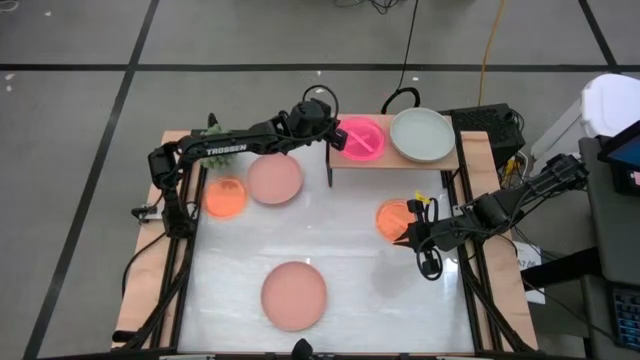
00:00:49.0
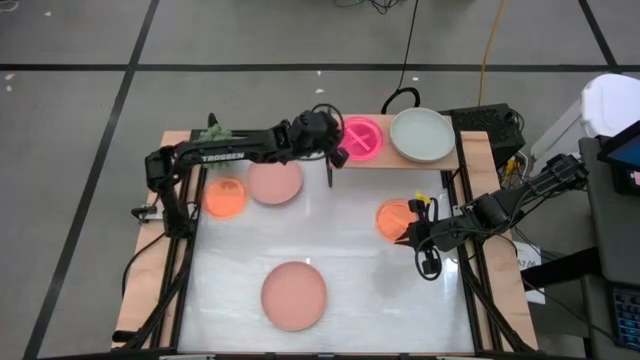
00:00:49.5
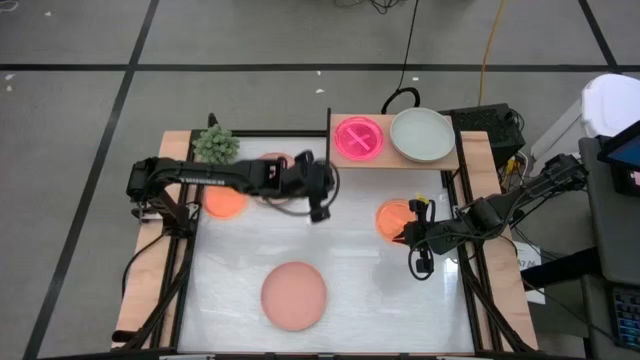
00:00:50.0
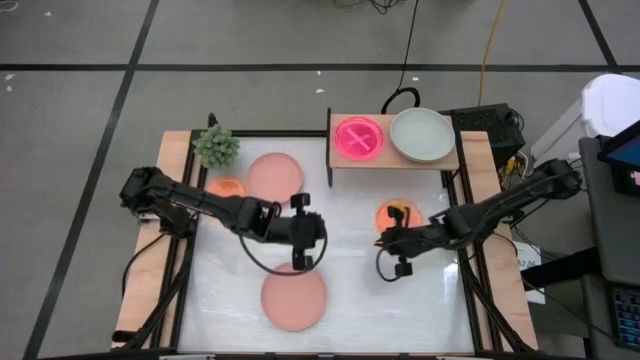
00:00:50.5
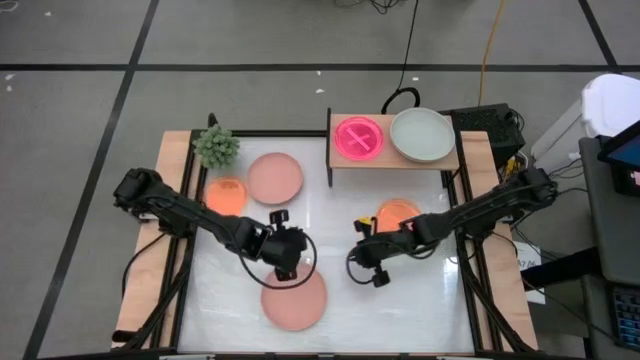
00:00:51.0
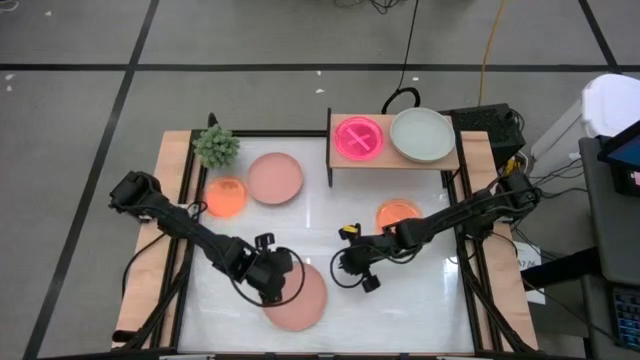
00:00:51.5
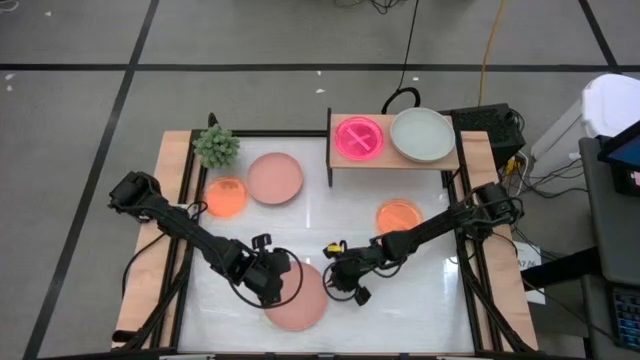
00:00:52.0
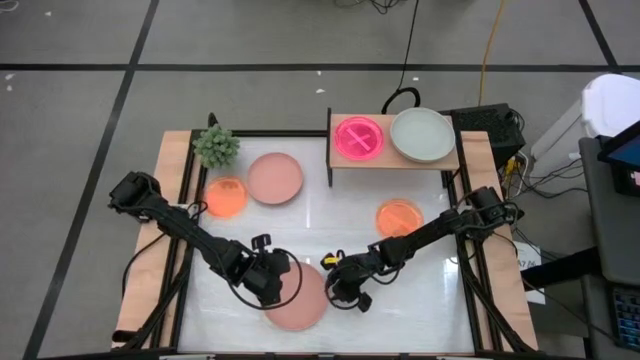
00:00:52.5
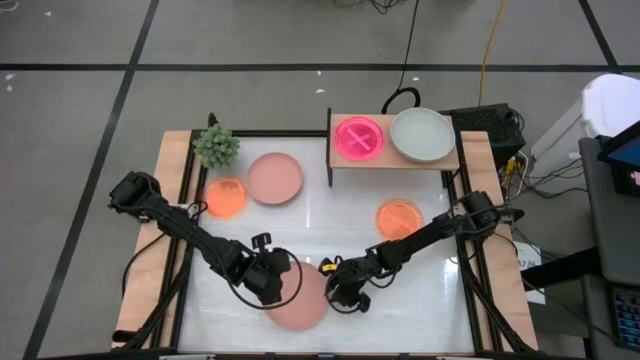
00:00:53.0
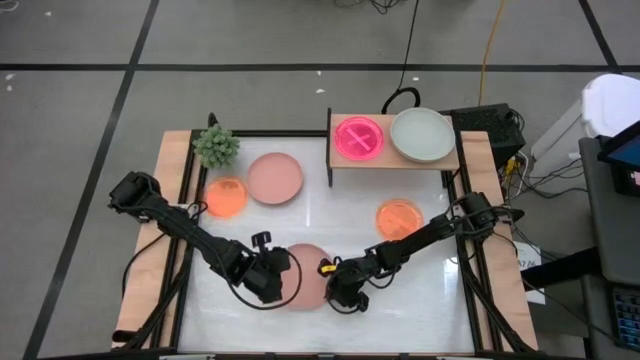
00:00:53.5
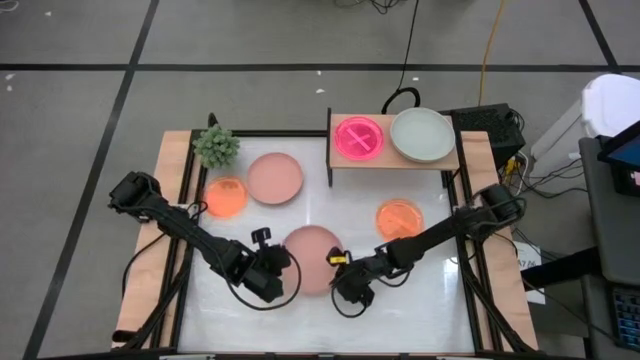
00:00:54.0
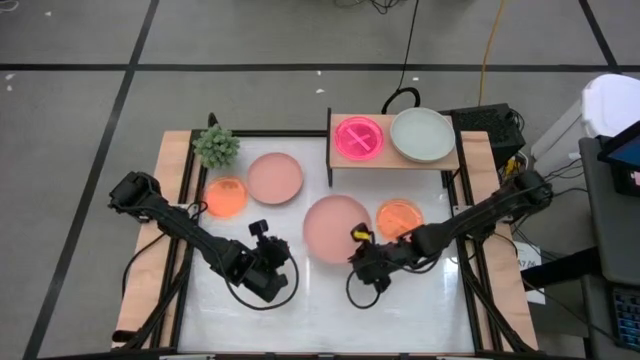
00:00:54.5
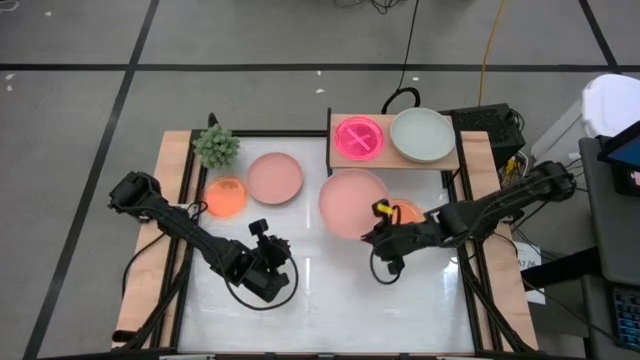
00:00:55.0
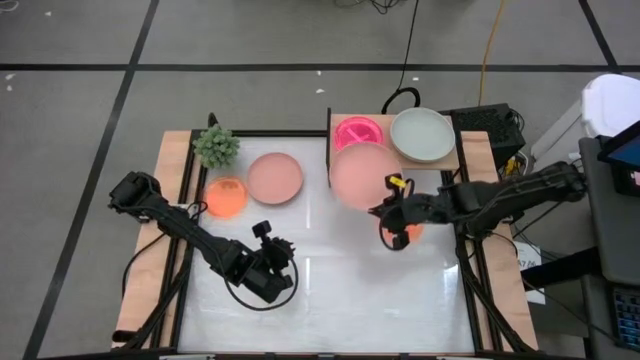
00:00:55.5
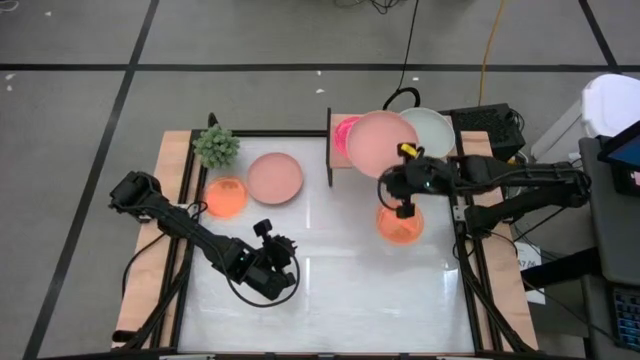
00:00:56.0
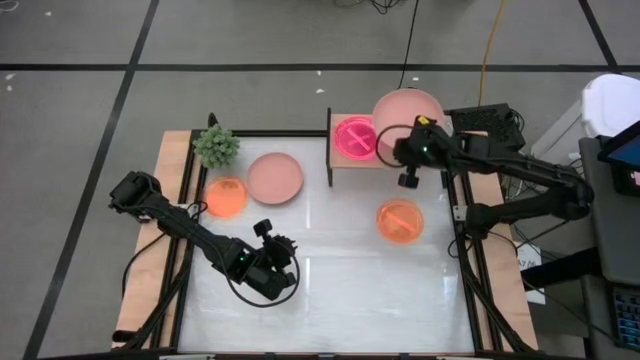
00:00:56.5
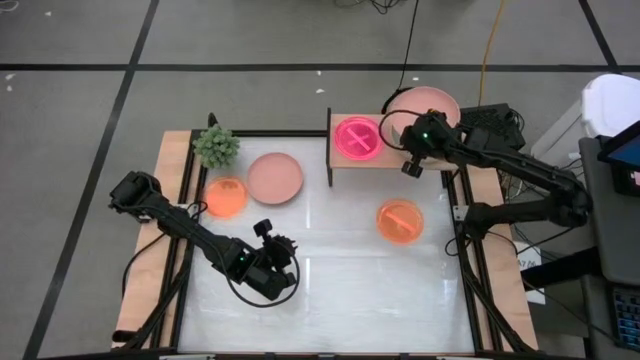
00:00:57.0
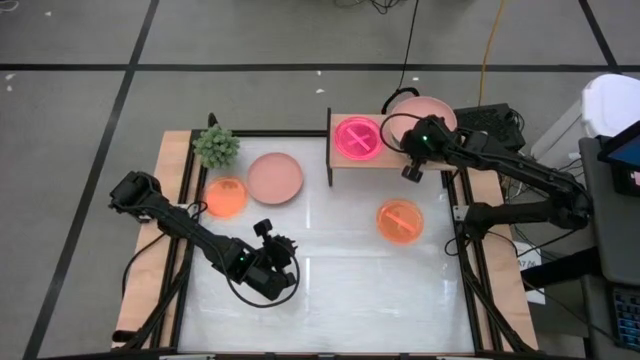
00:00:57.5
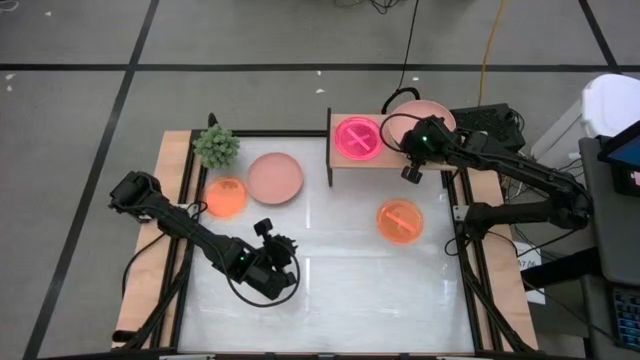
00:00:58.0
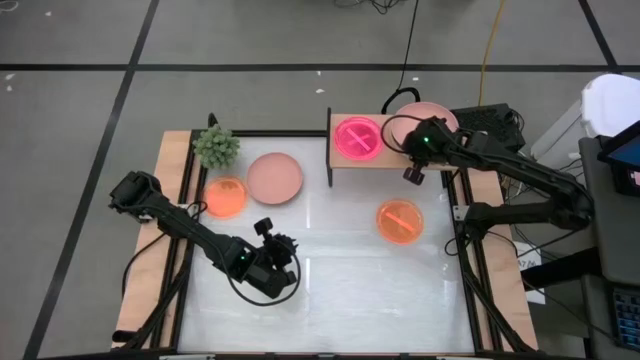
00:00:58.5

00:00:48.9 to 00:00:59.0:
Task: Place and stack plates onto a shelf
Stack the bottom pink plate on top of the gray plate on the shelf

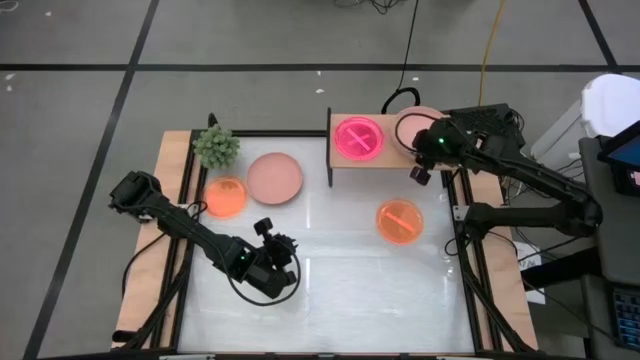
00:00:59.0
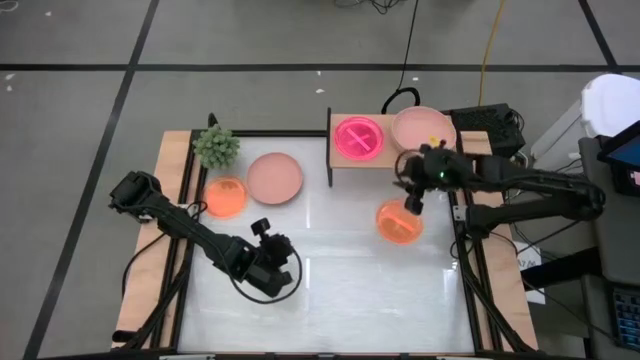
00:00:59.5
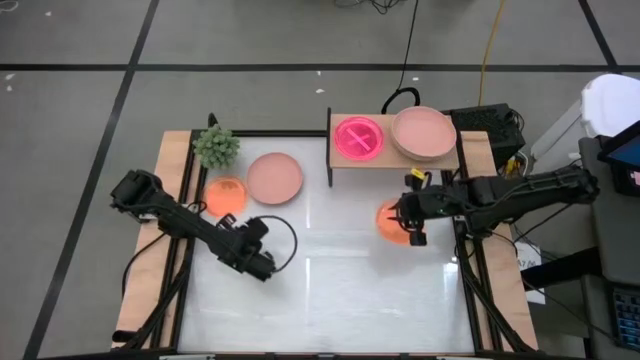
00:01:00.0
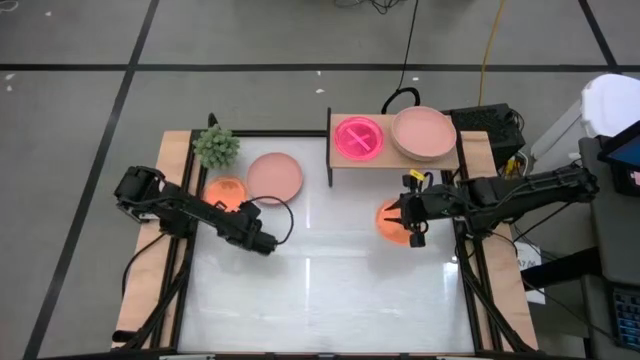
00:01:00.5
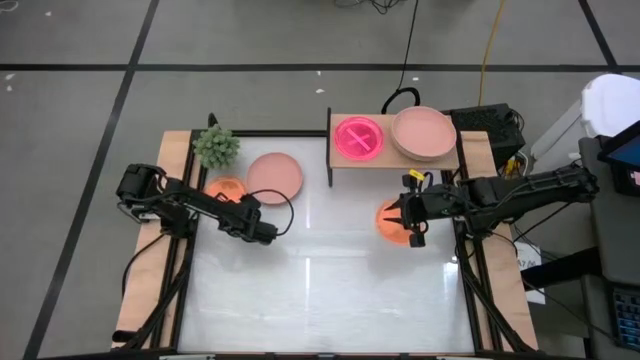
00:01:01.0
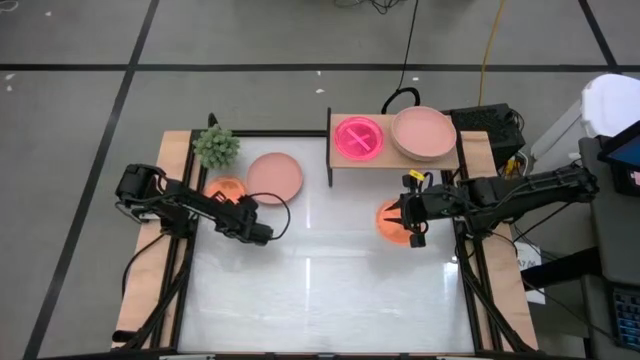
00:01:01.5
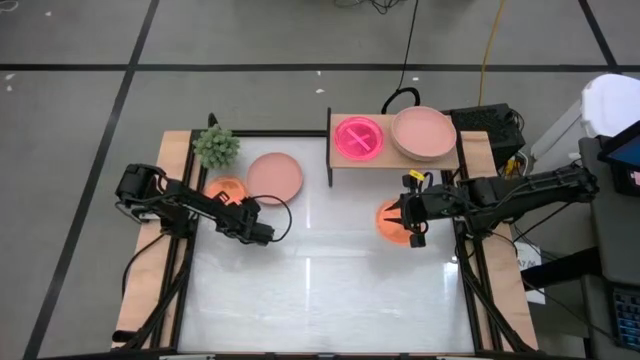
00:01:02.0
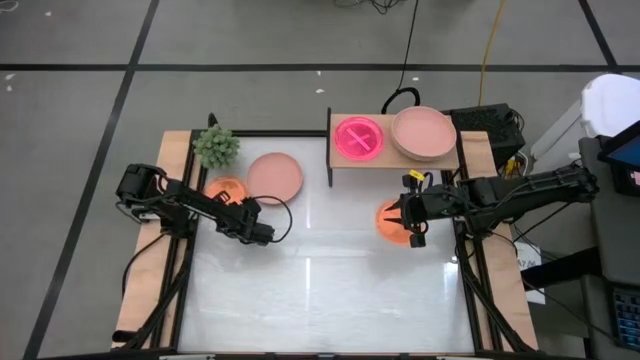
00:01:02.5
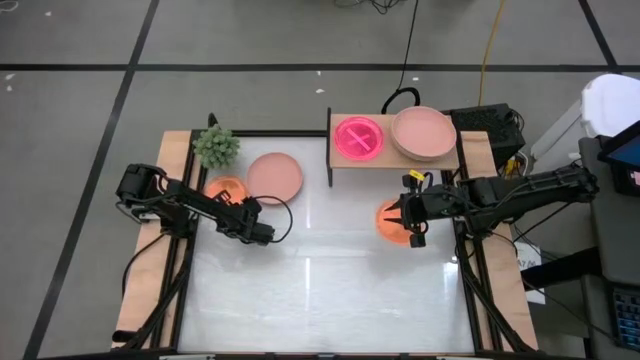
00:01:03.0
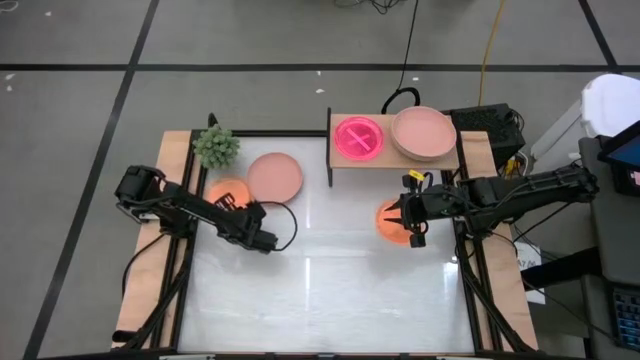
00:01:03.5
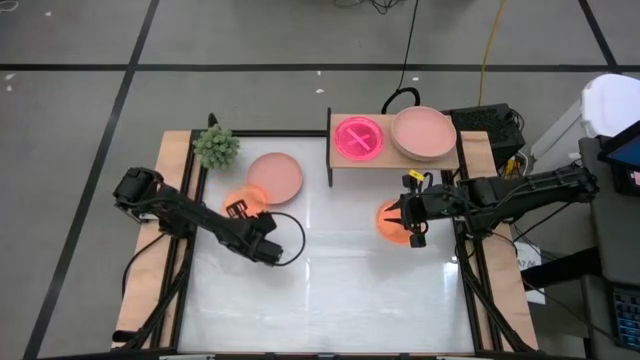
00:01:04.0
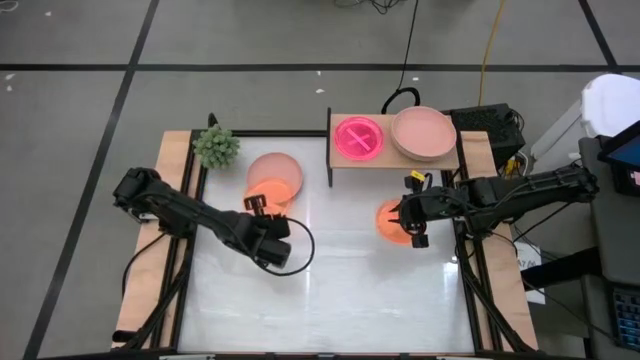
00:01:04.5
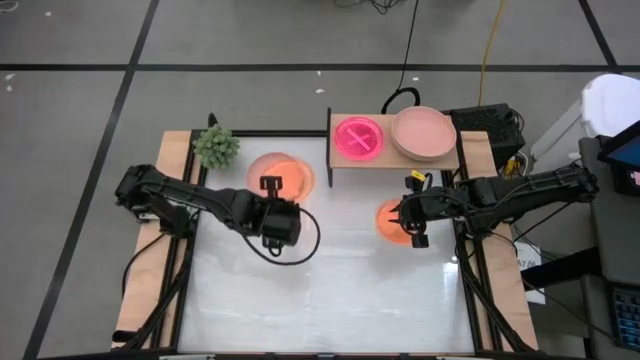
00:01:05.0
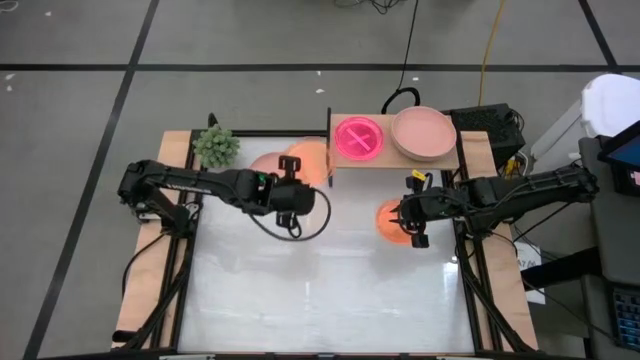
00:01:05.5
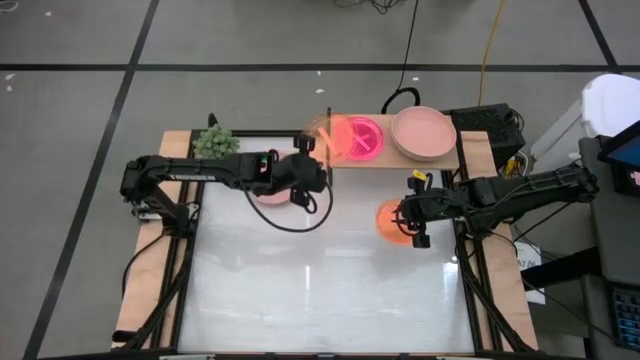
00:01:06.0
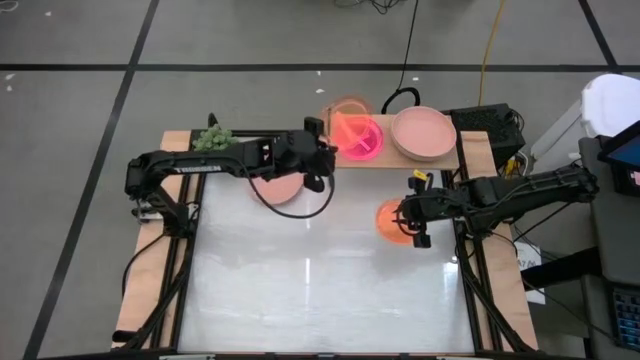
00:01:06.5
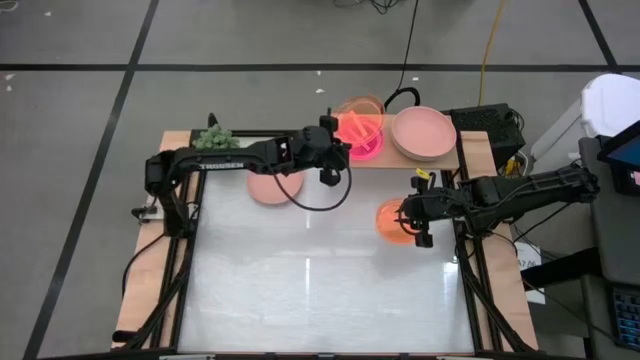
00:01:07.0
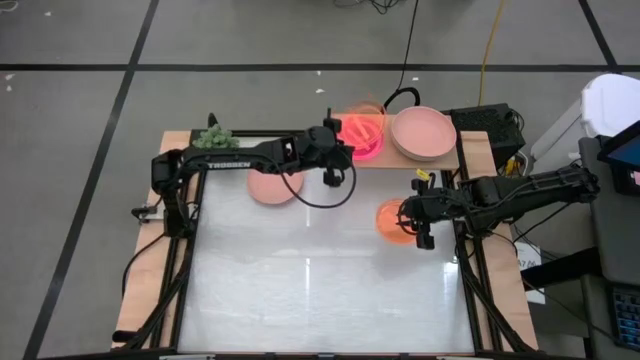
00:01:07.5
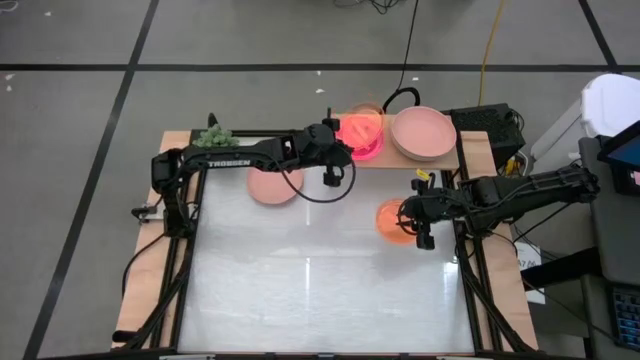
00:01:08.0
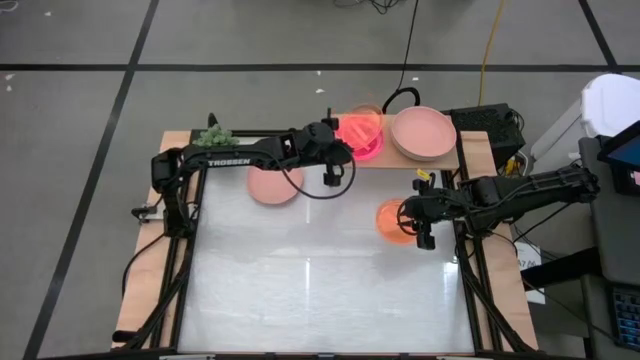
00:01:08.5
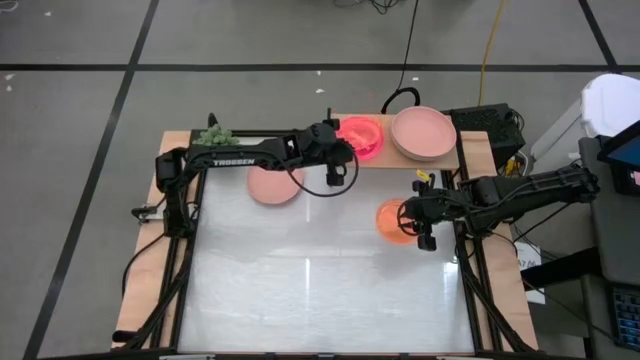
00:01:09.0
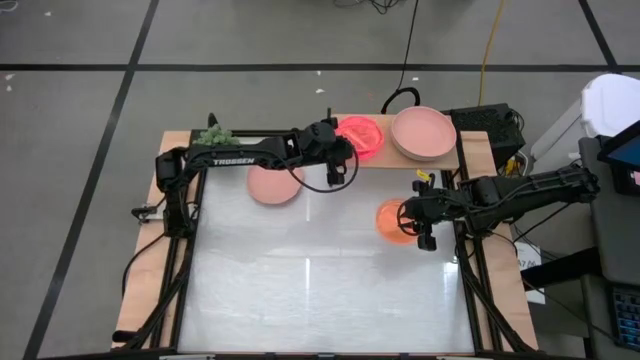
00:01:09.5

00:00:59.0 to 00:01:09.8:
Stack the left orange plate on top of the light pink plate on the shelf
